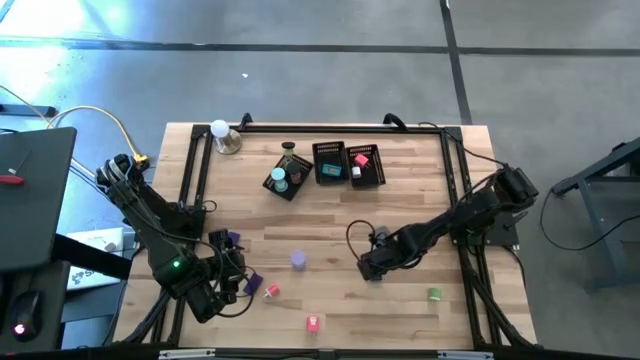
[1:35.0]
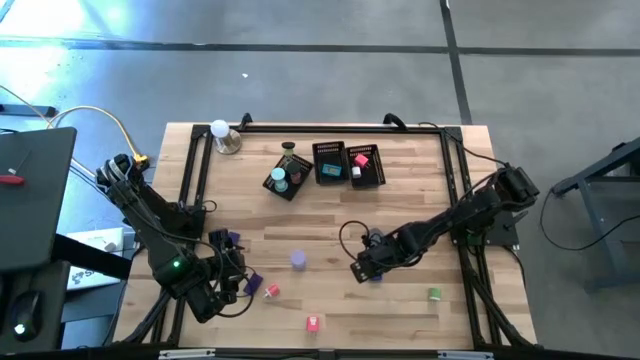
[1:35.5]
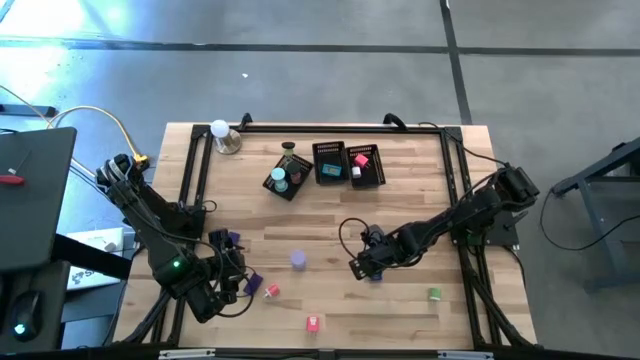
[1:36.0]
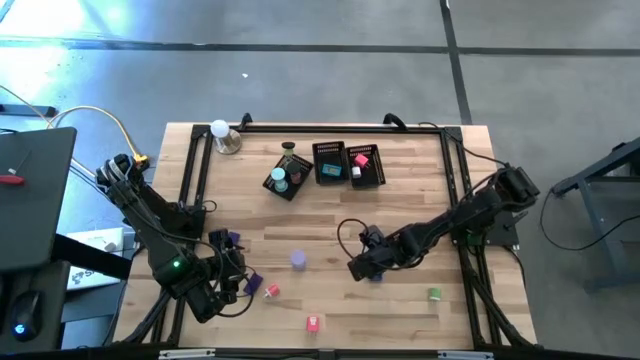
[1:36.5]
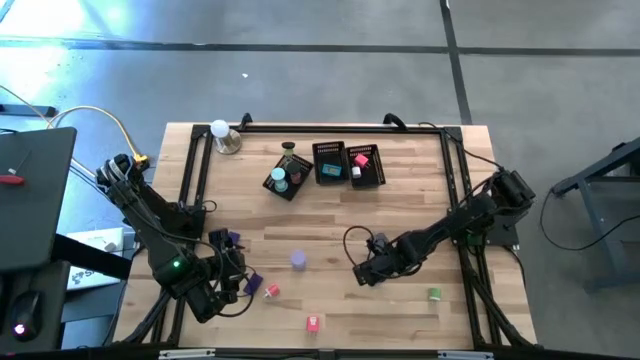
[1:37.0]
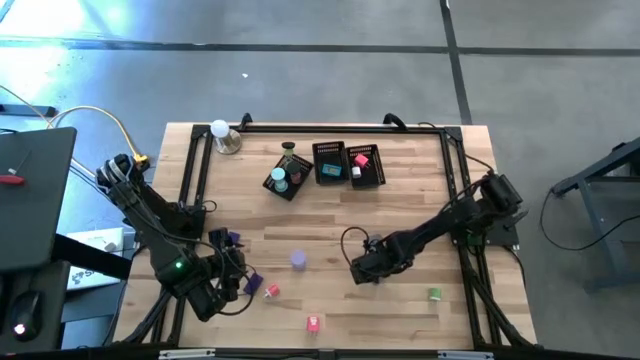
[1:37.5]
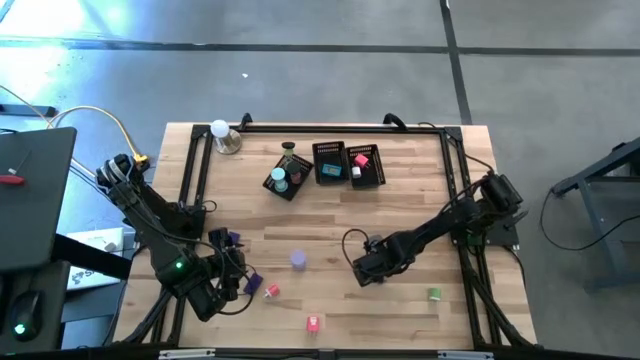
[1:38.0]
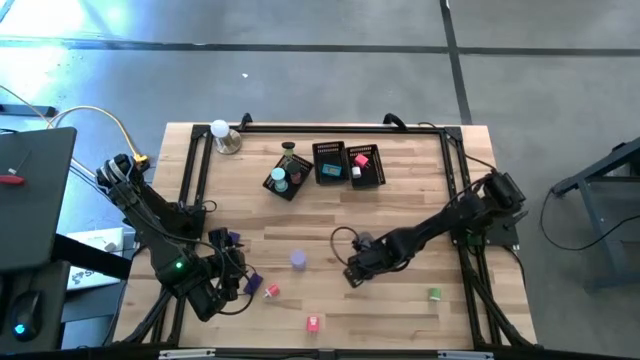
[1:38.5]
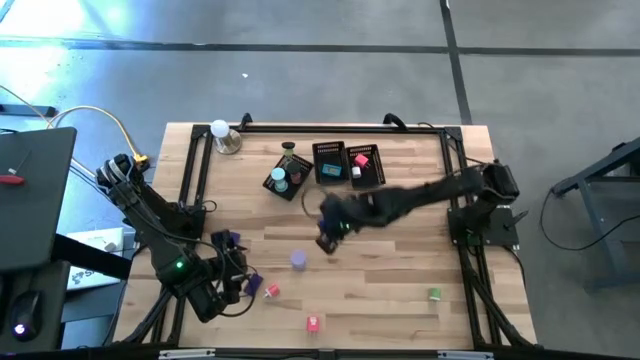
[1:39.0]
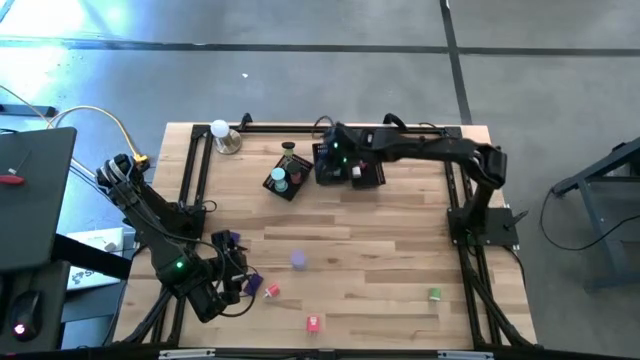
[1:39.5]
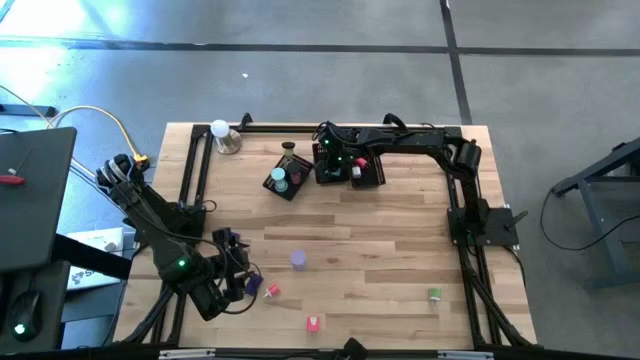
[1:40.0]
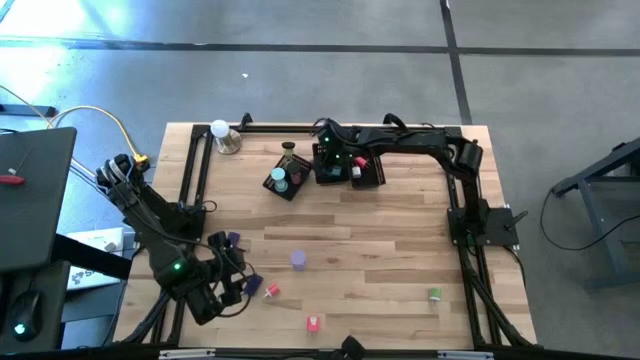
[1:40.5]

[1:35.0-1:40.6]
Task: Pick & Place Office items
Put the blue digital timer into the middle black bin

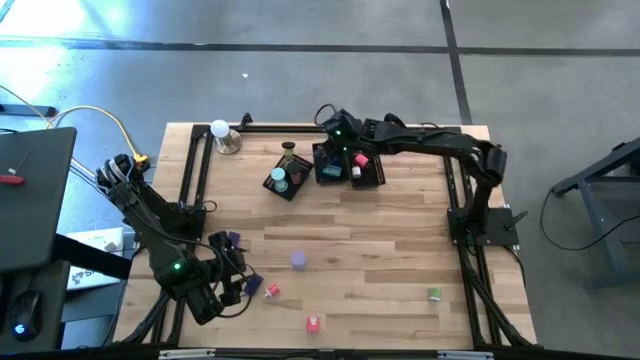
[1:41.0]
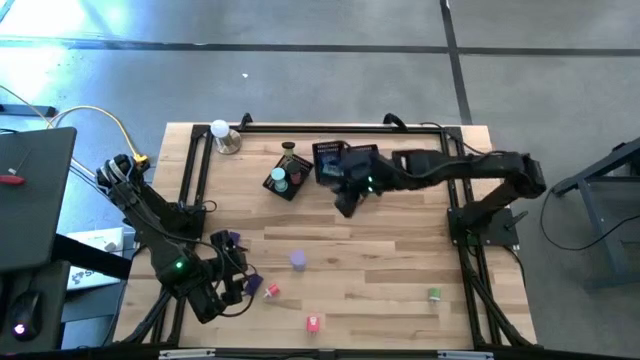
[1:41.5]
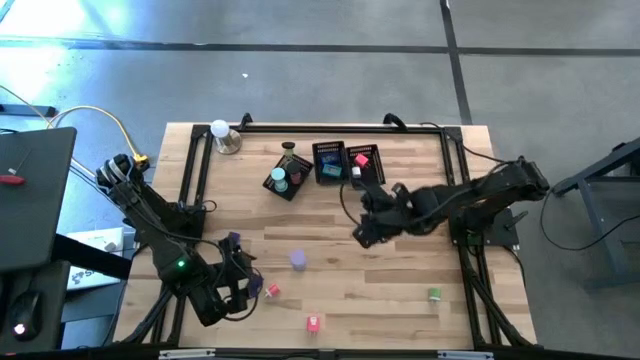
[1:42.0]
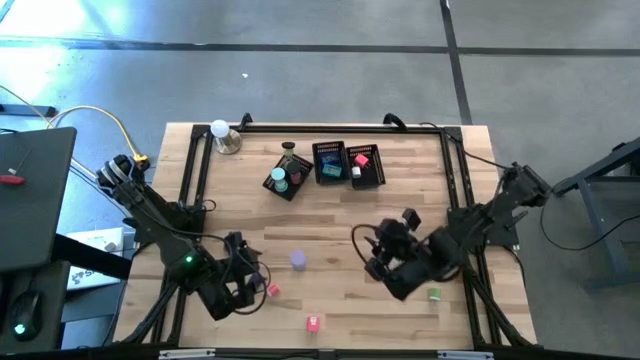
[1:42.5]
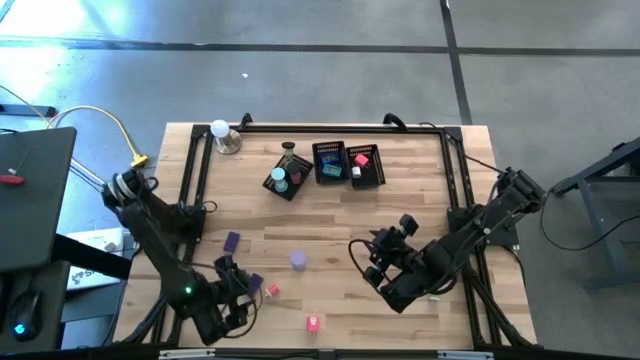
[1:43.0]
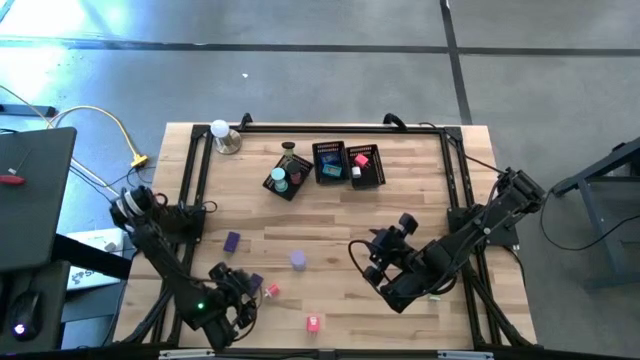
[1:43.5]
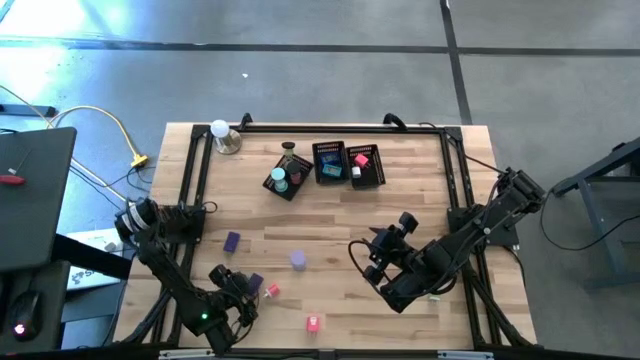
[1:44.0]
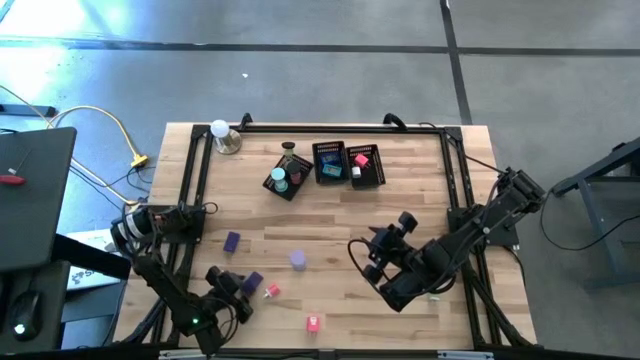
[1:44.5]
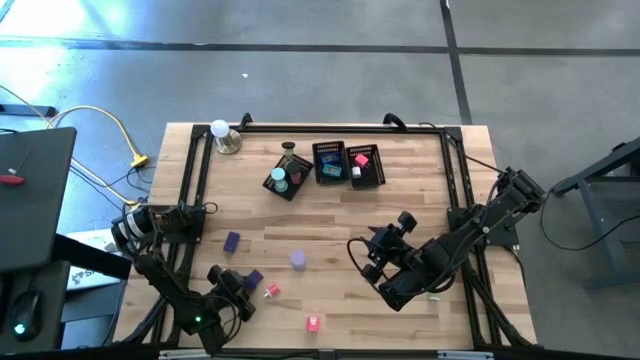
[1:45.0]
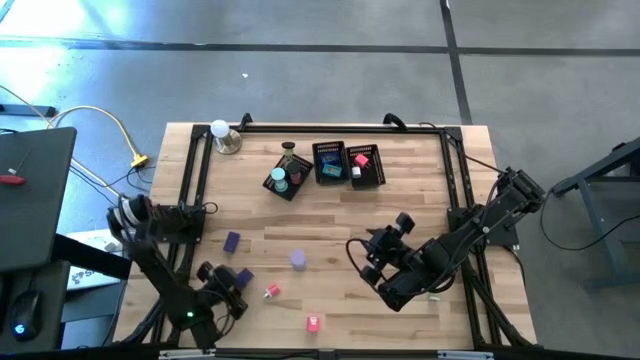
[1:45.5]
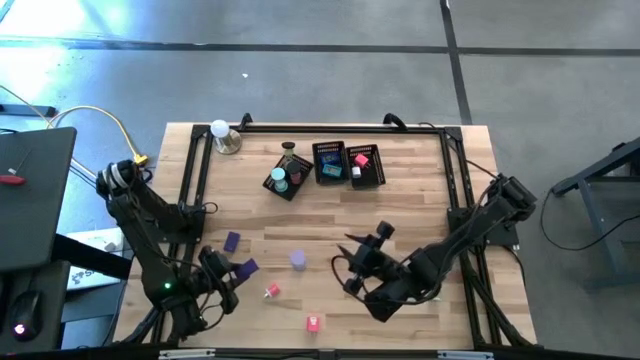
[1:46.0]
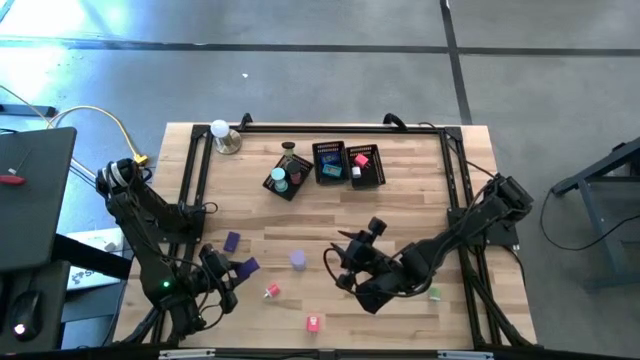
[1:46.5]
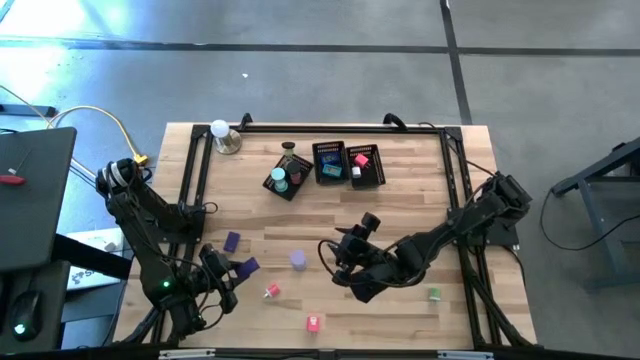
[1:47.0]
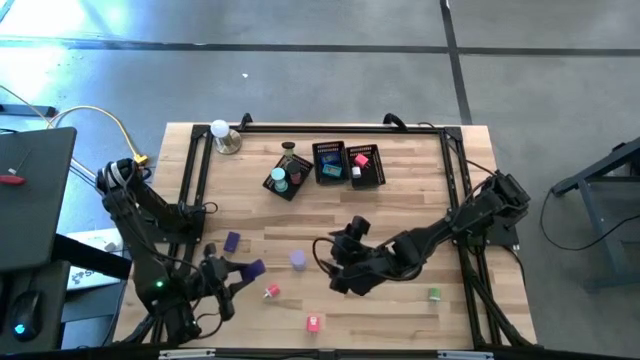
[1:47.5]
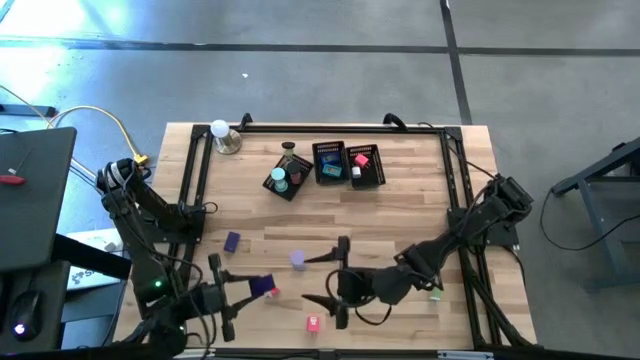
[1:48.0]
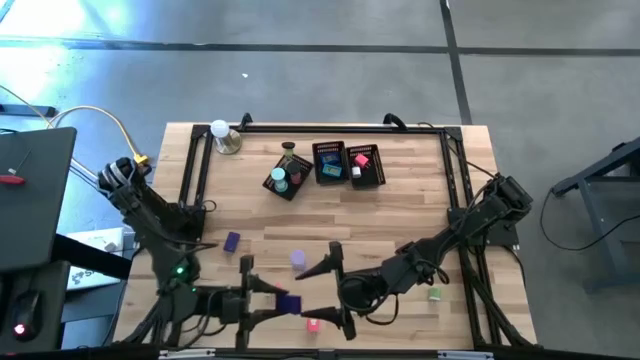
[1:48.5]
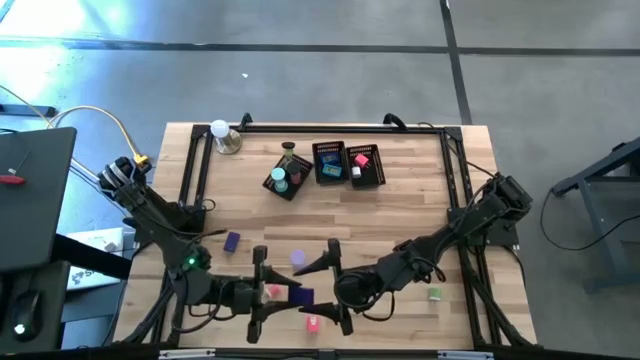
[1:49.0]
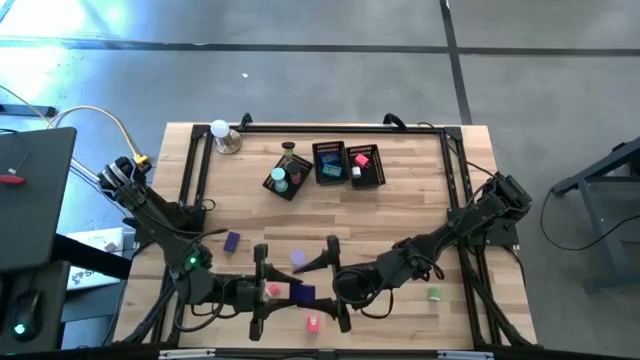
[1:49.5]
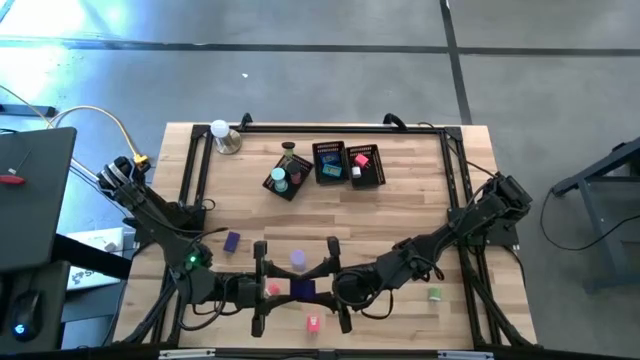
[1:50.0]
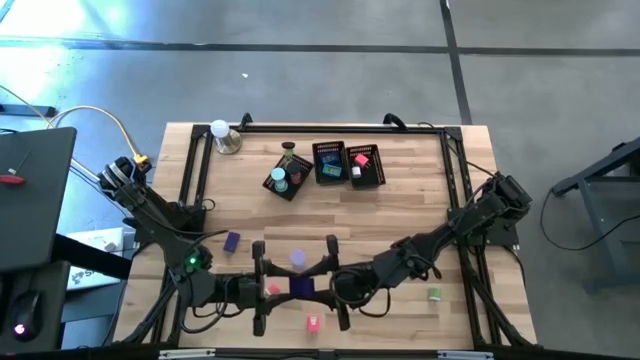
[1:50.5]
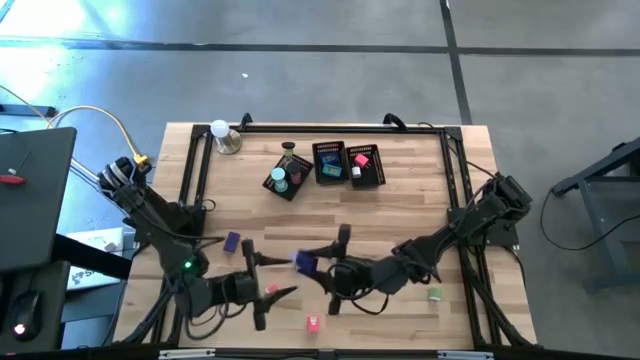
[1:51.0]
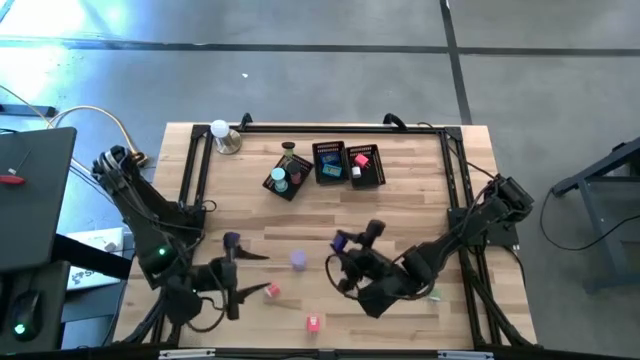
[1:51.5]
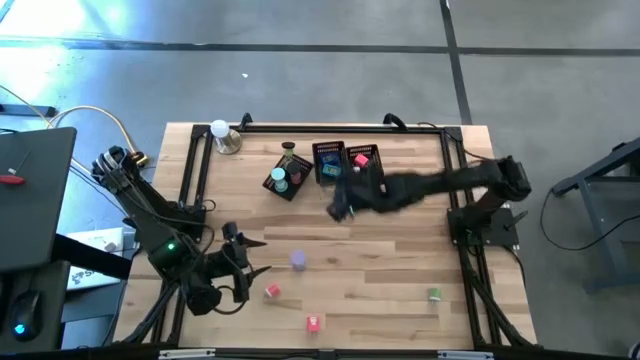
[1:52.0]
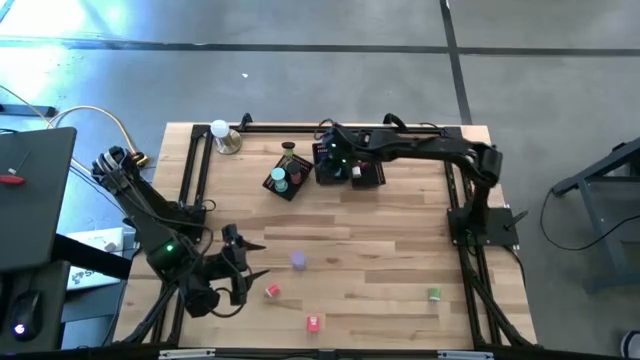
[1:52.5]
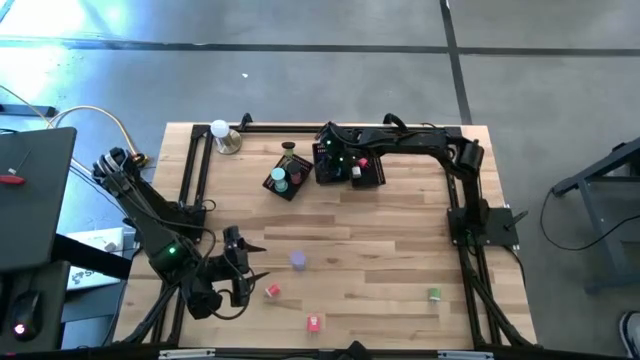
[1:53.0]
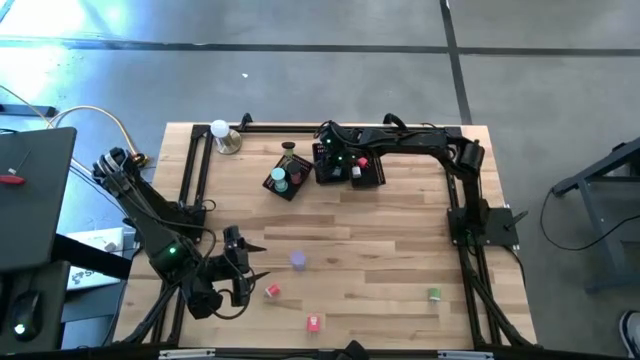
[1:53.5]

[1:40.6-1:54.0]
Put the right purple digital timer into the middle black bin

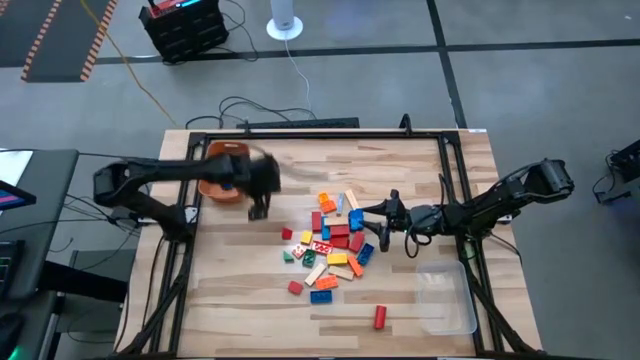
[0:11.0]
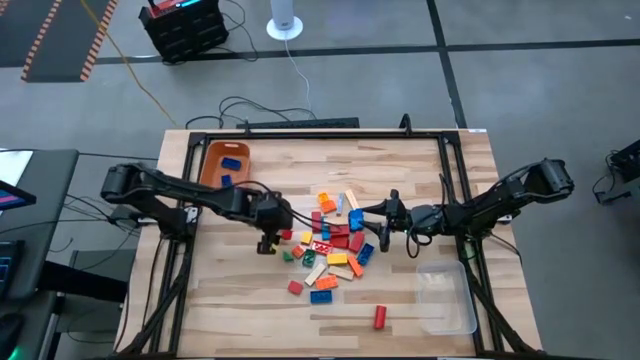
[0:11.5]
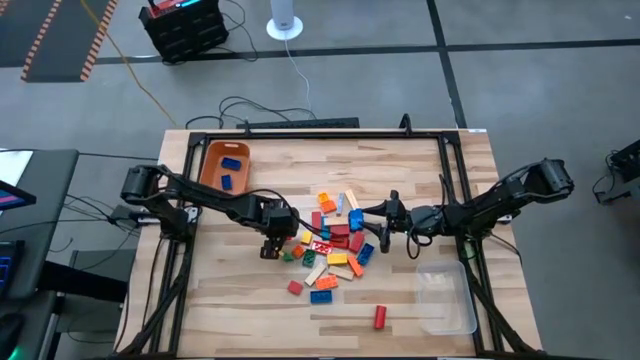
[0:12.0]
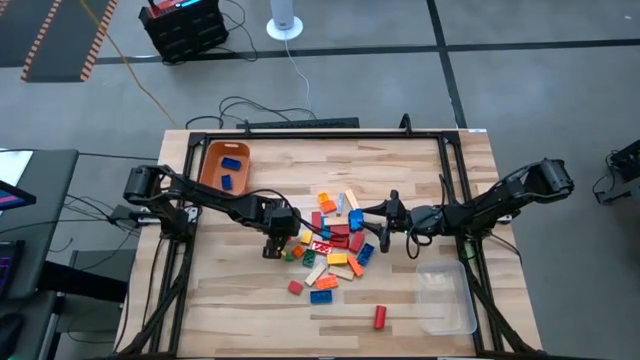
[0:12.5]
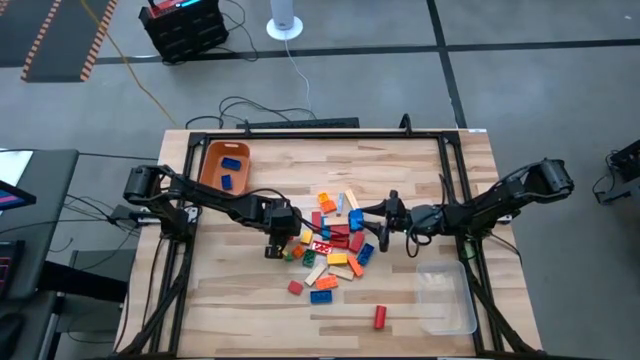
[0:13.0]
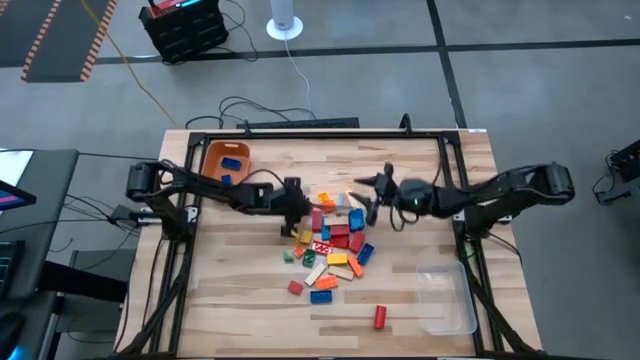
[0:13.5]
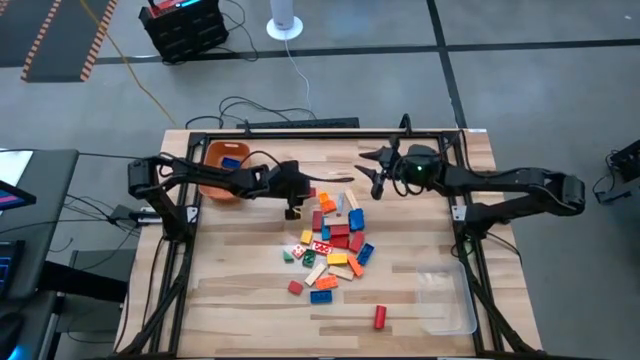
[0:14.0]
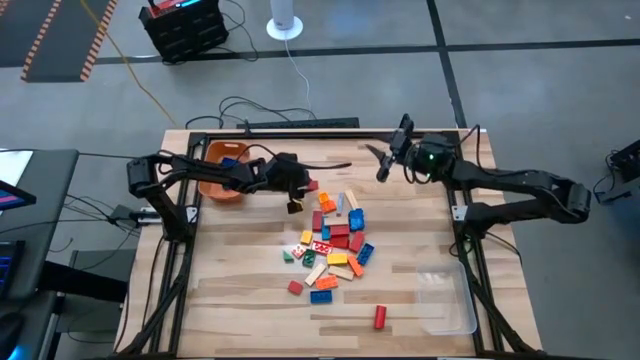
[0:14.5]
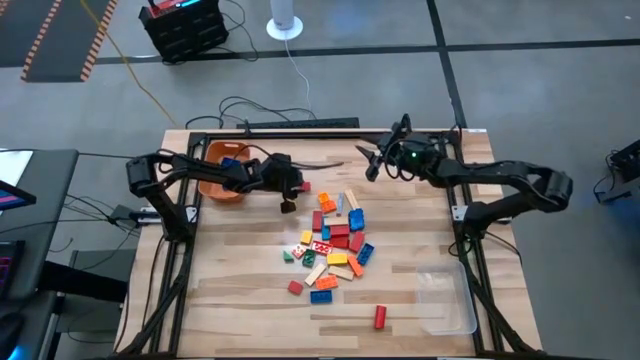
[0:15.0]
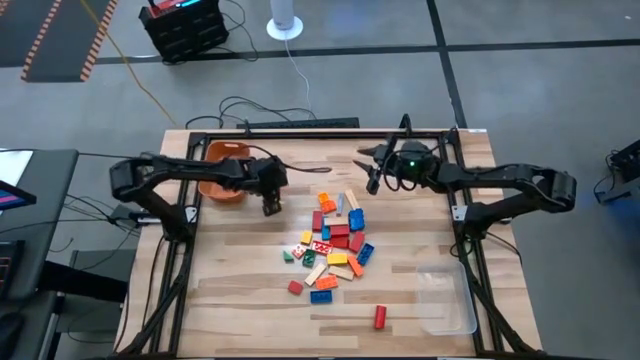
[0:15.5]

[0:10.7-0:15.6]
Task: Sort blocks by size
Move the small red wooden block to the top left of the table
